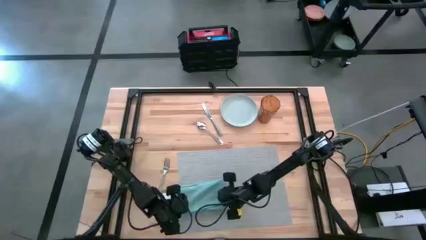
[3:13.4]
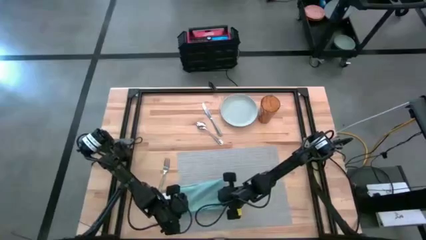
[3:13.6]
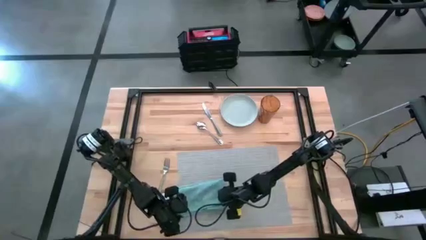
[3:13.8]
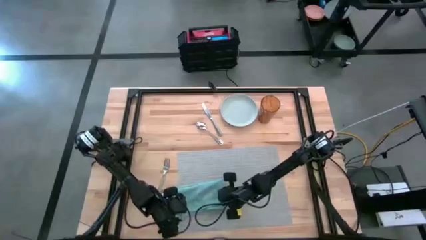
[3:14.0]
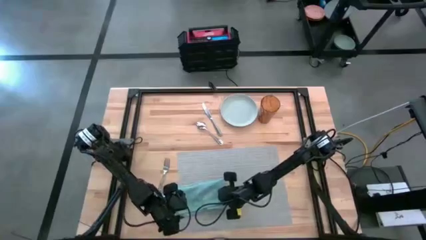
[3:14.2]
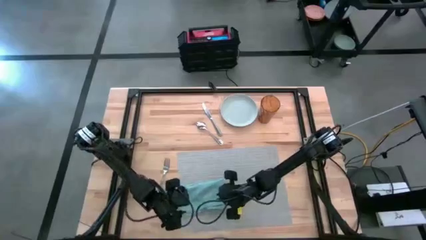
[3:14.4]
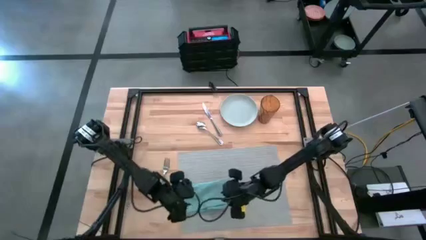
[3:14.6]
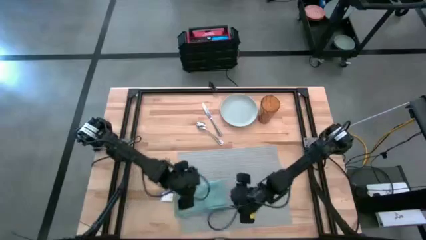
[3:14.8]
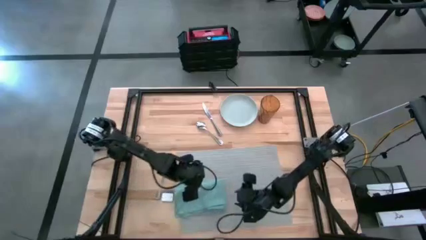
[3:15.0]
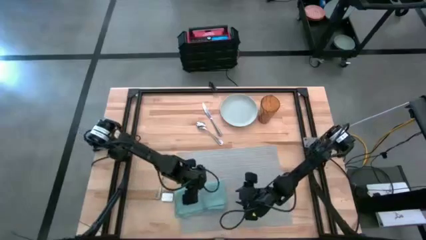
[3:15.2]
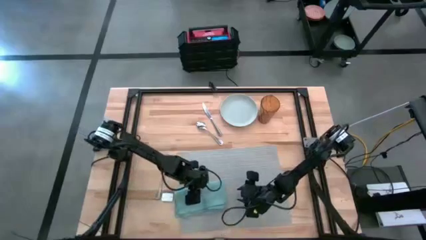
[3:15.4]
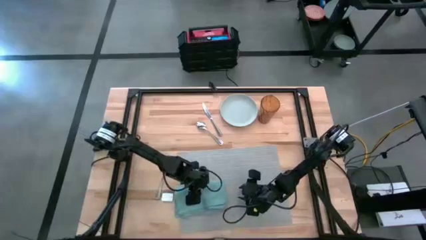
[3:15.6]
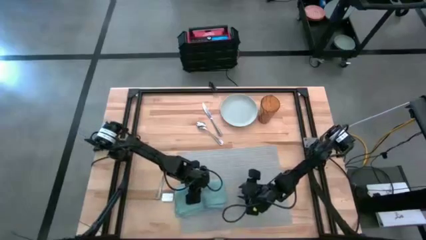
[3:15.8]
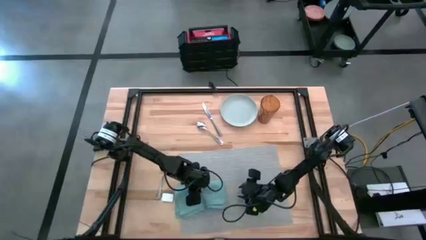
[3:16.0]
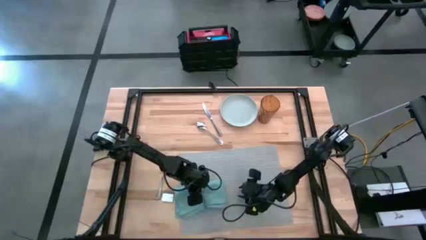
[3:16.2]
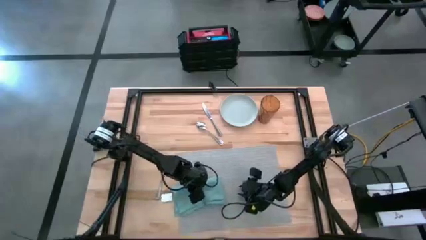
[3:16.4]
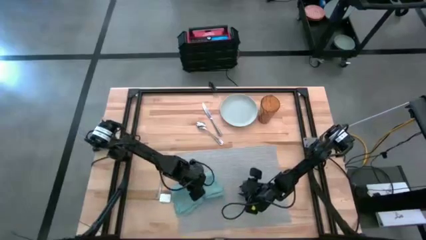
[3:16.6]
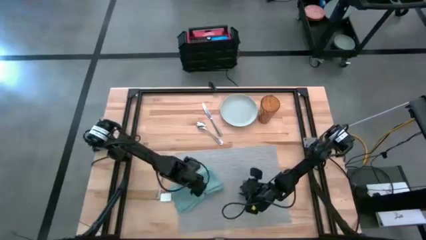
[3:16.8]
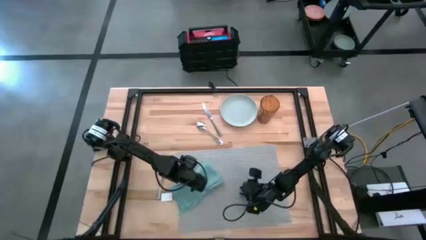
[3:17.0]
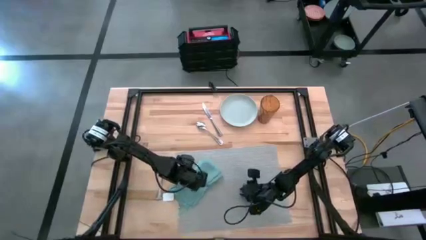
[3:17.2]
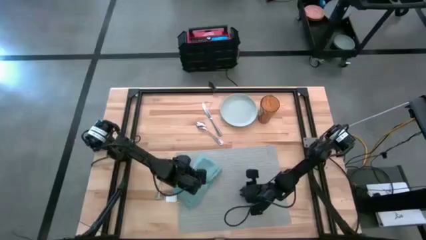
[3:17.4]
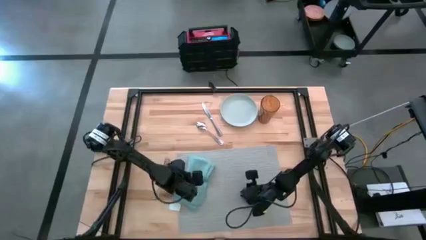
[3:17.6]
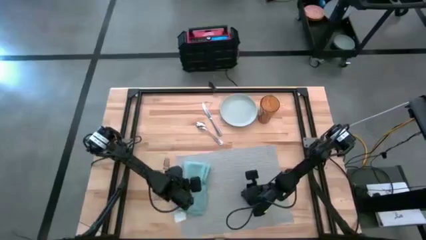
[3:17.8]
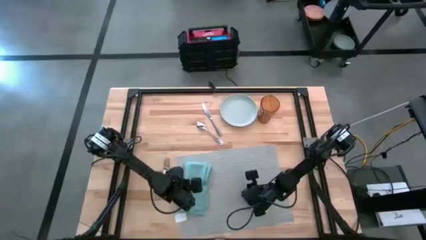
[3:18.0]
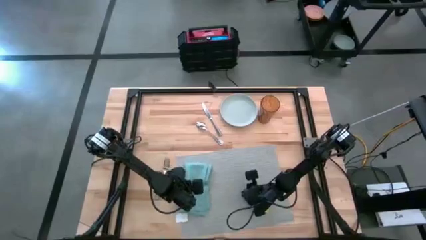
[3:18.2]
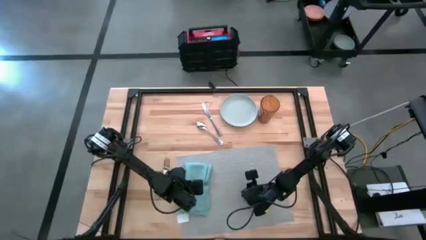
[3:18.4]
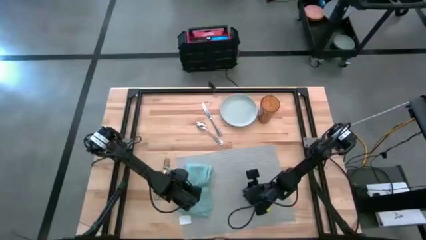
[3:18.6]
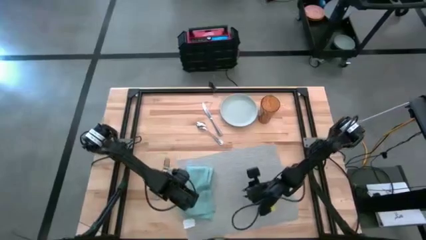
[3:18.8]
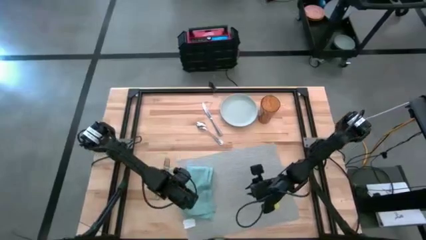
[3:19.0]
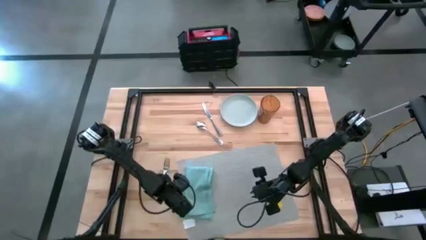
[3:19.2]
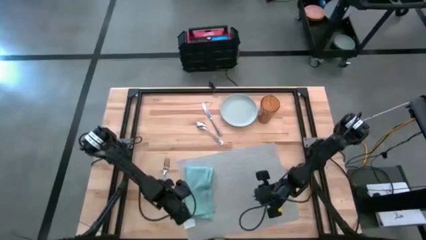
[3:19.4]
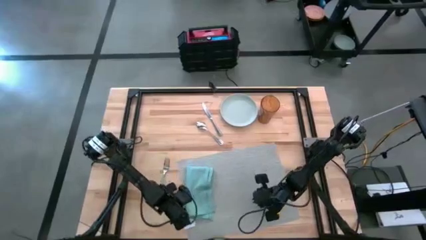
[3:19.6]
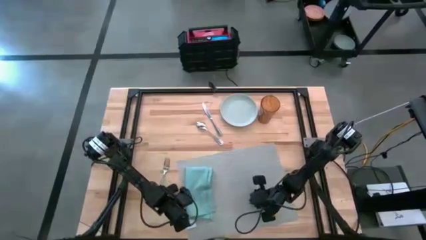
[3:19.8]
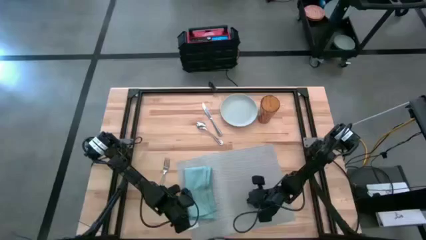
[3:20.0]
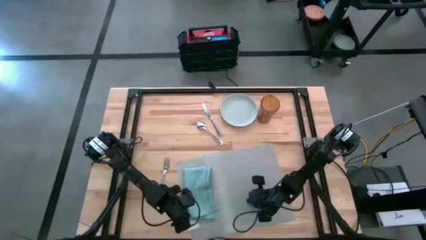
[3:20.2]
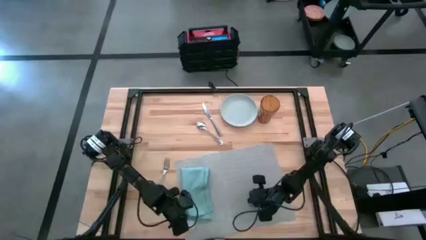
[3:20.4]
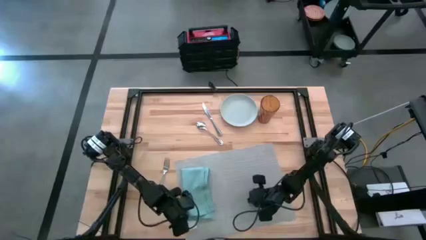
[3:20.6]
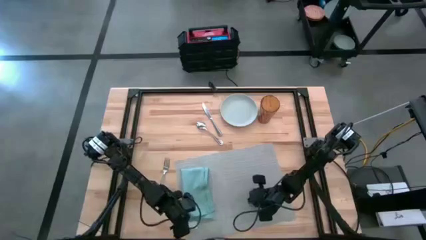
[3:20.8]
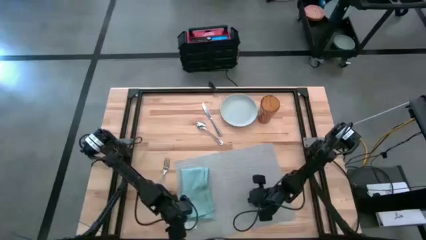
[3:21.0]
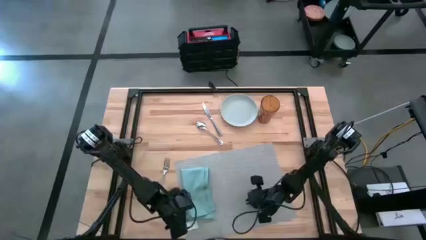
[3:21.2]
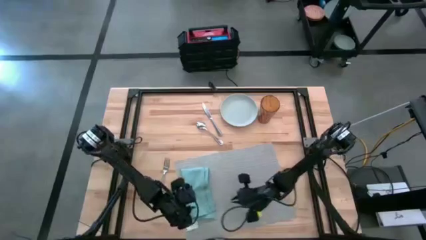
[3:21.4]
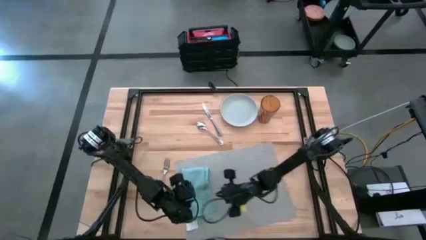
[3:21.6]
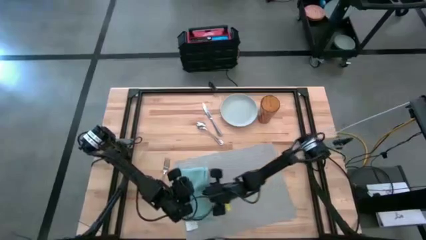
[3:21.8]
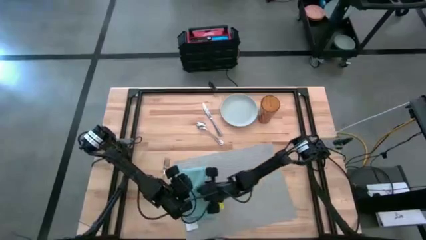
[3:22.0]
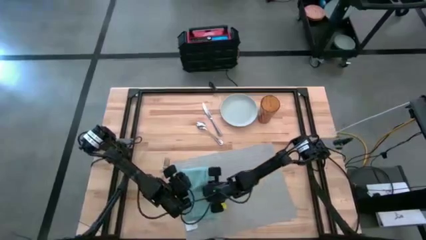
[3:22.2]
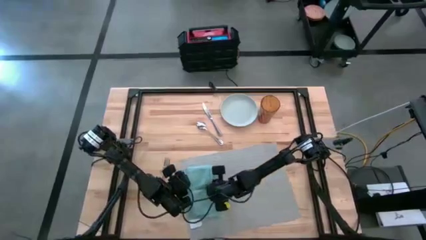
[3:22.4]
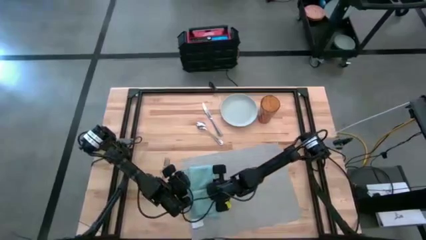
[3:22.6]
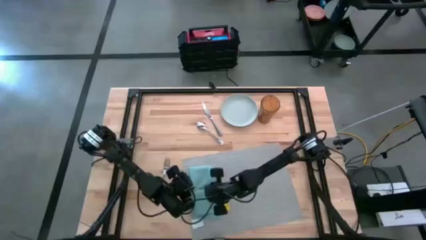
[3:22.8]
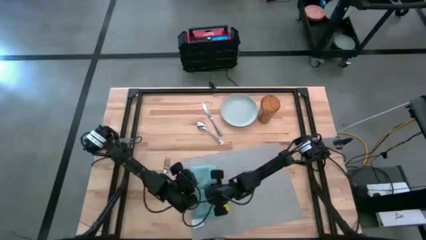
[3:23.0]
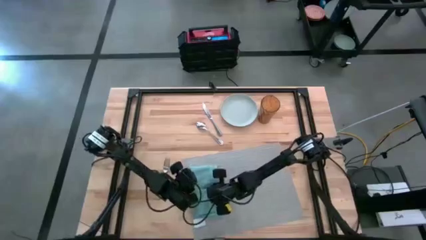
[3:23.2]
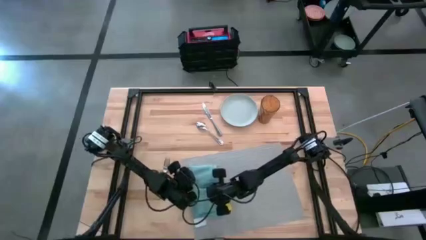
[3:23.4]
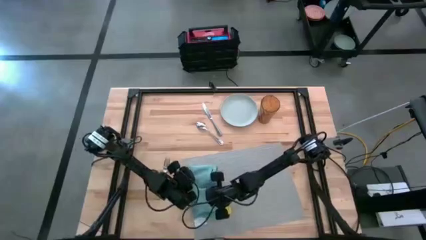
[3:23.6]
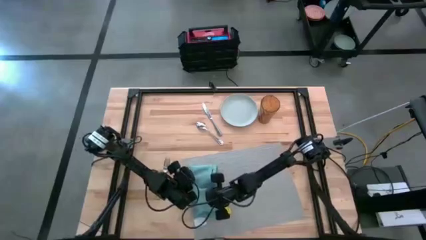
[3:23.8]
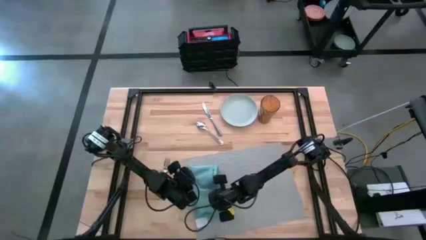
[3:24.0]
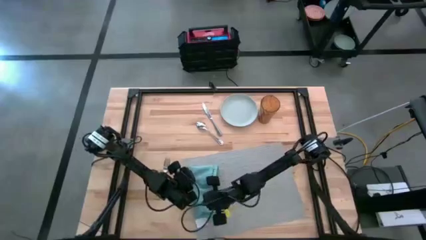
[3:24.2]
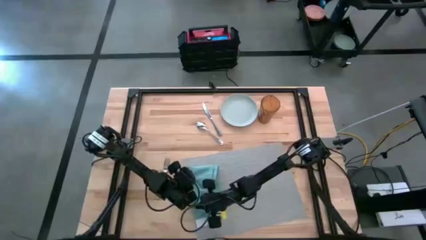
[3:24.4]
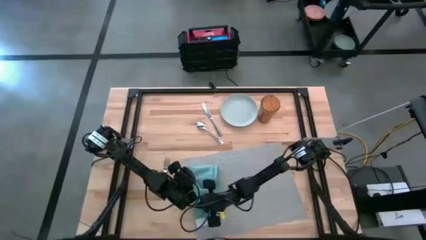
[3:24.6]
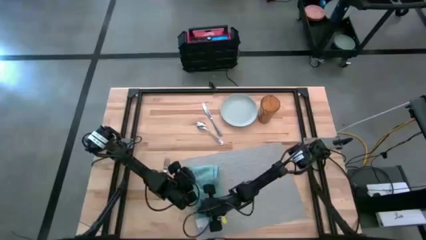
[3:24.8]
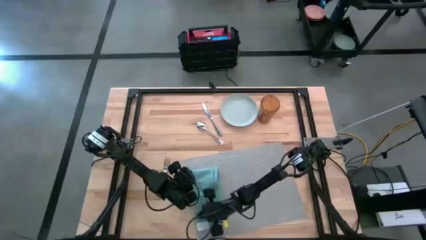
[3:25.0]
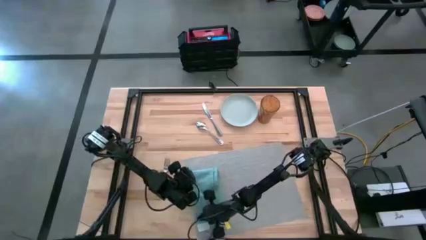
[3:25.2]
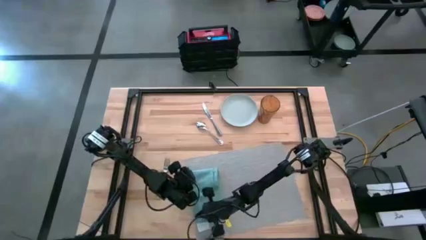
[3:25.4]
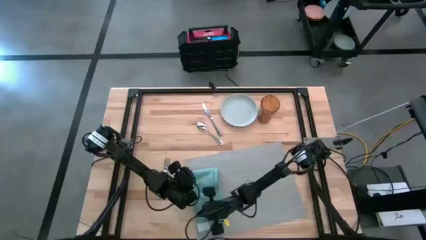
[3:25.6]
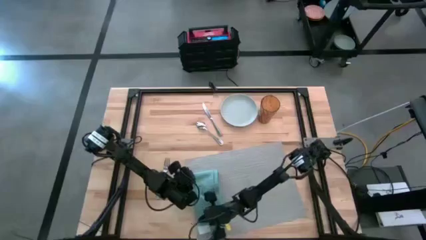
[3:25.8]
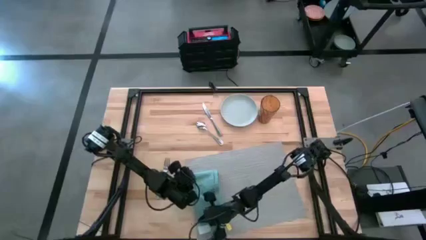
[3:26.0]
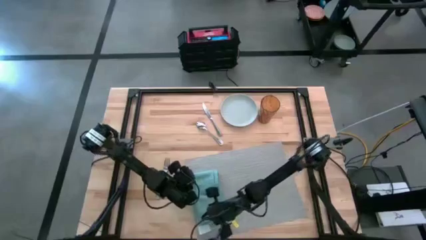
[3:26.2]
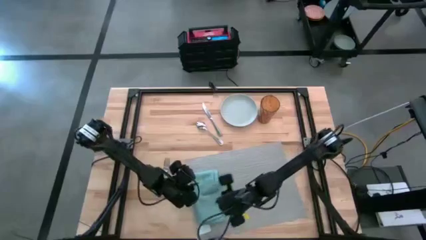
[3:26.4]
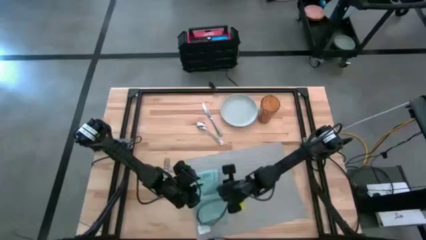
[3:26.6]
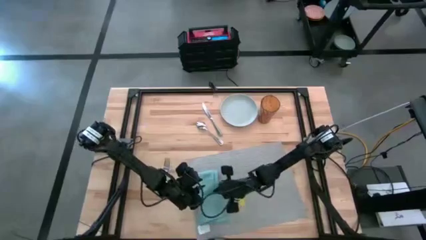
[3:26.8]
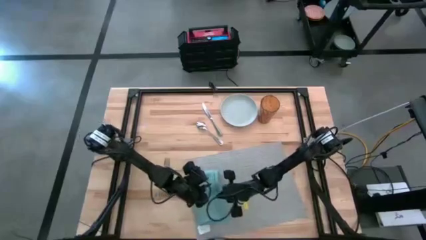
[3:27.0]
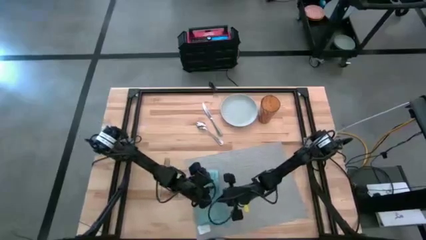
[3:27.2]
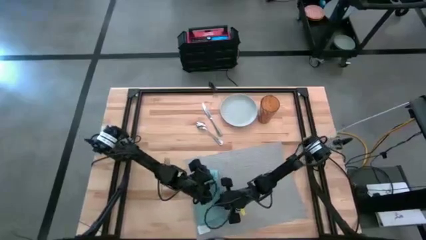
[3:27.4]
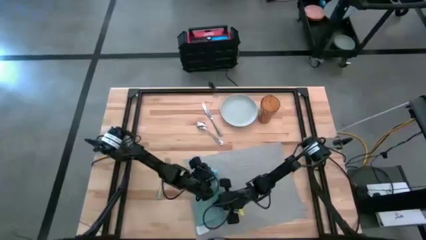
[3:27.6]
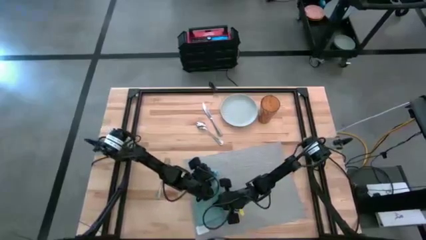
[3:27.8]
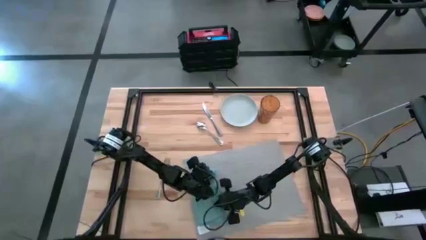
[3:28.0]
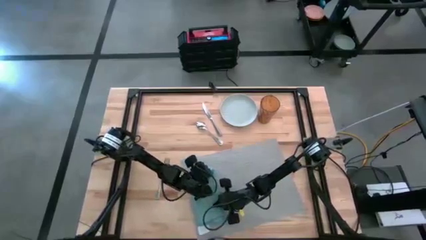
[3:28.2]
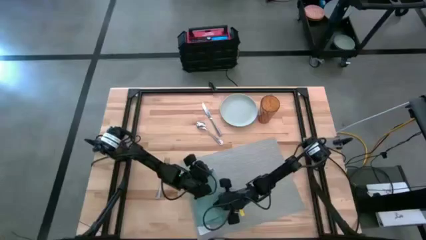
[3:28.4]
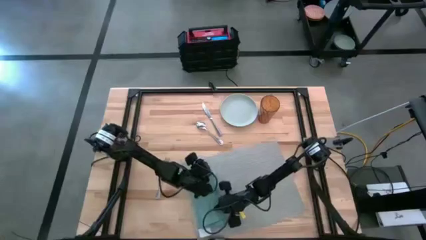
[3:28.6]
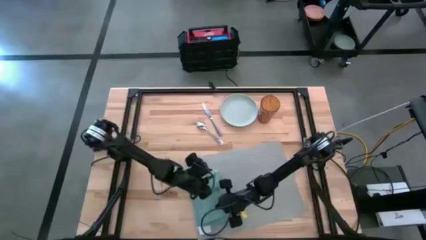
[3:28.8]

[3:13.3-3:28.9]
Task: Set table place
Fold the blue napkin on the gray placemat
